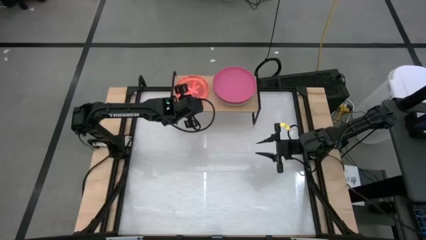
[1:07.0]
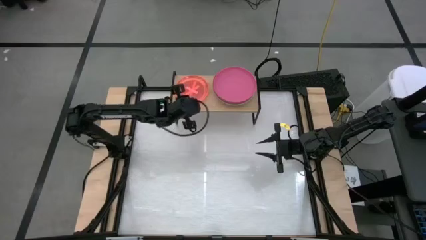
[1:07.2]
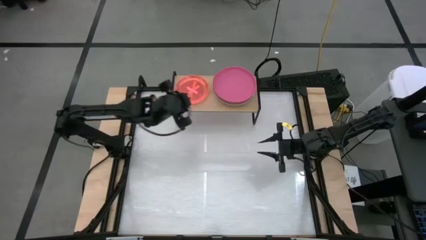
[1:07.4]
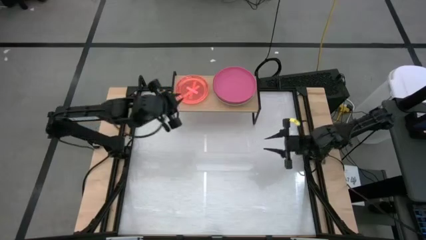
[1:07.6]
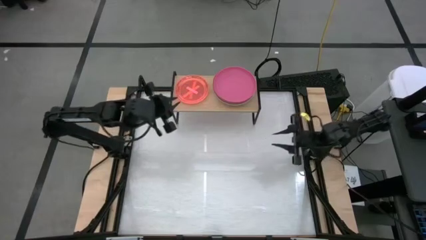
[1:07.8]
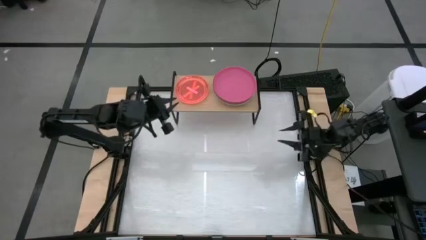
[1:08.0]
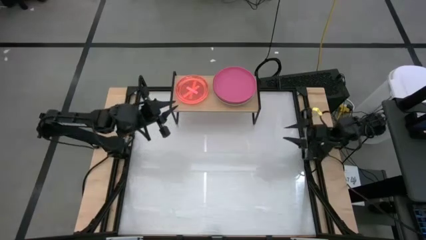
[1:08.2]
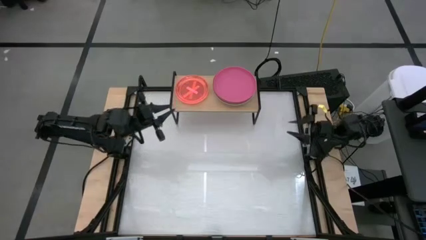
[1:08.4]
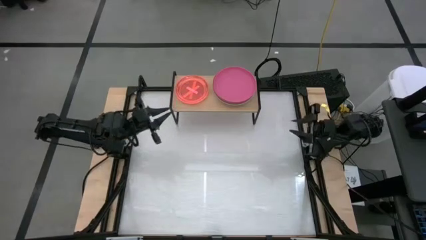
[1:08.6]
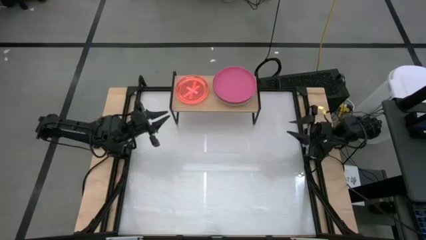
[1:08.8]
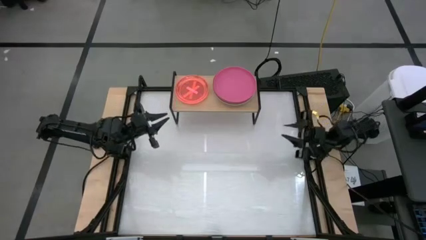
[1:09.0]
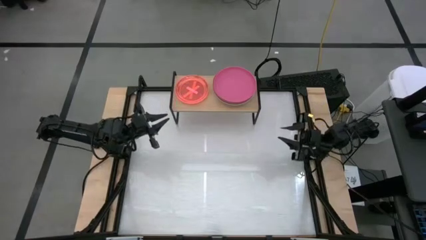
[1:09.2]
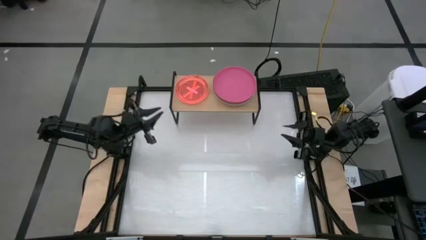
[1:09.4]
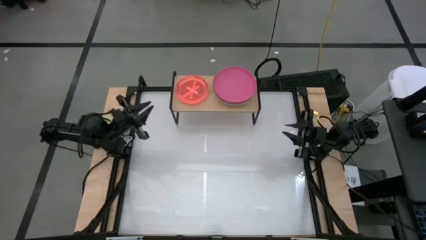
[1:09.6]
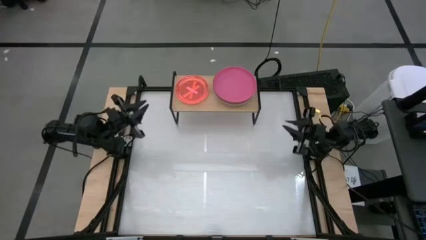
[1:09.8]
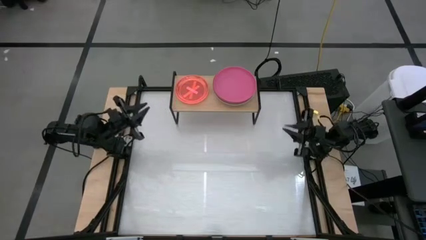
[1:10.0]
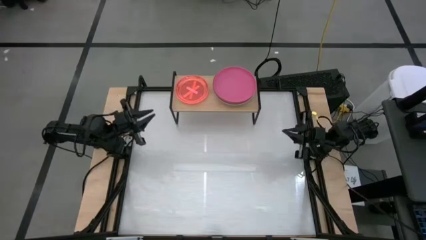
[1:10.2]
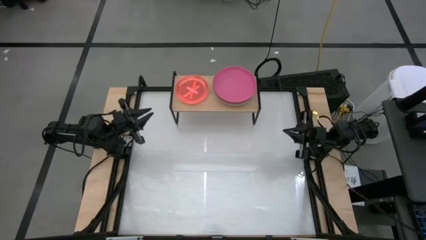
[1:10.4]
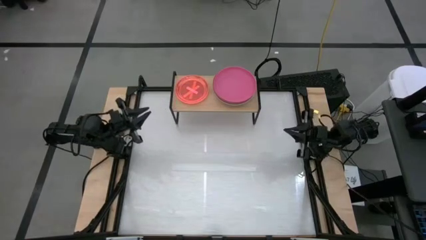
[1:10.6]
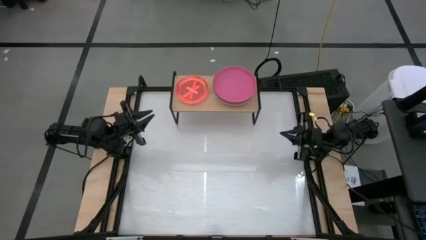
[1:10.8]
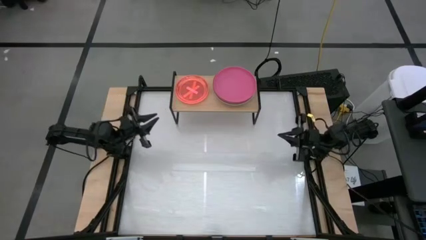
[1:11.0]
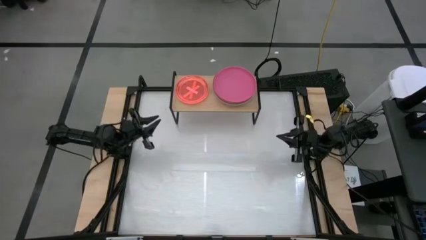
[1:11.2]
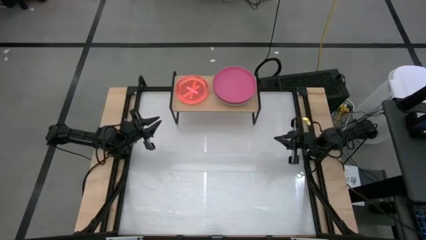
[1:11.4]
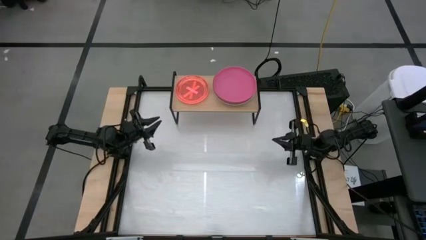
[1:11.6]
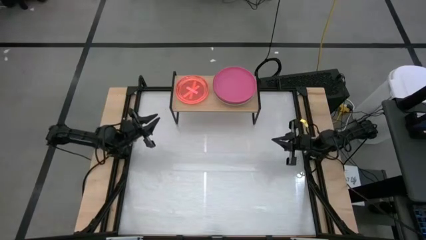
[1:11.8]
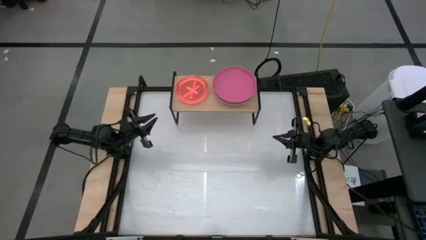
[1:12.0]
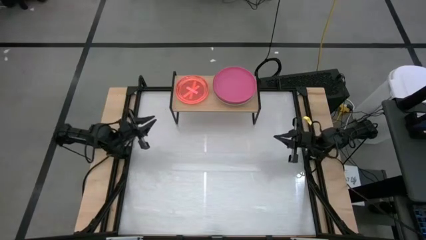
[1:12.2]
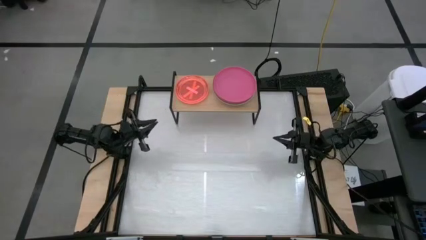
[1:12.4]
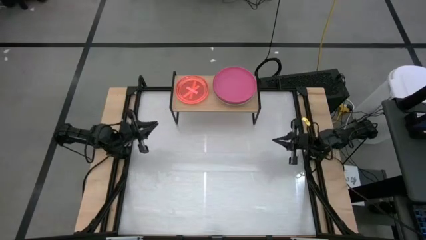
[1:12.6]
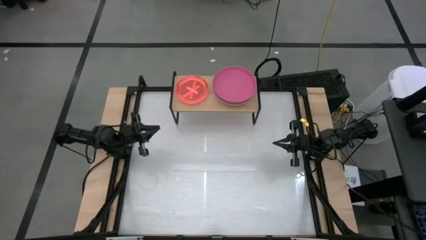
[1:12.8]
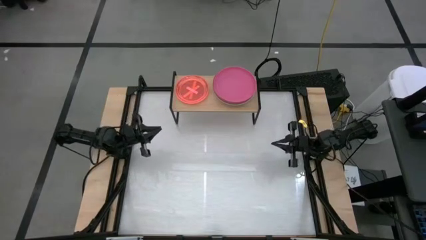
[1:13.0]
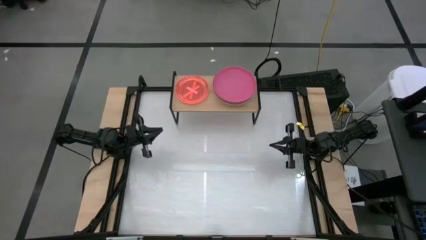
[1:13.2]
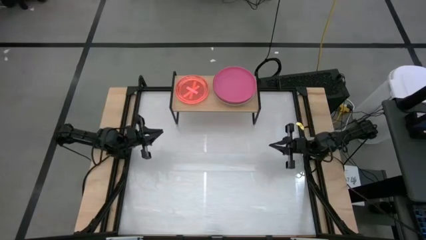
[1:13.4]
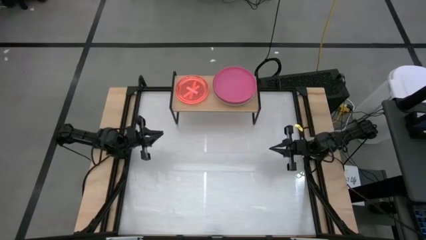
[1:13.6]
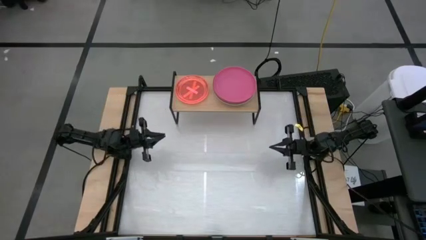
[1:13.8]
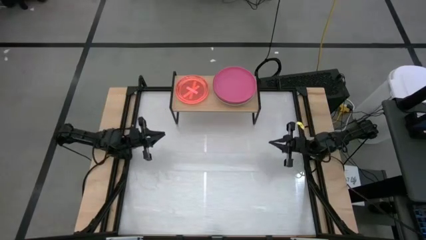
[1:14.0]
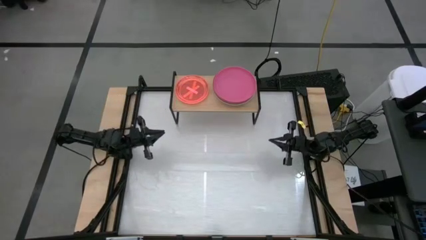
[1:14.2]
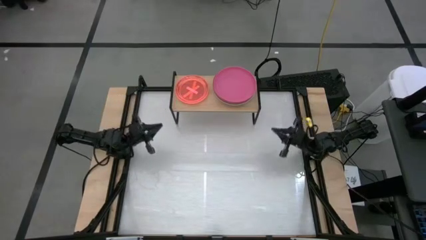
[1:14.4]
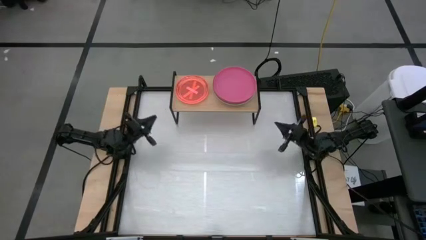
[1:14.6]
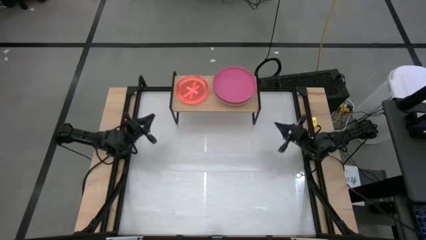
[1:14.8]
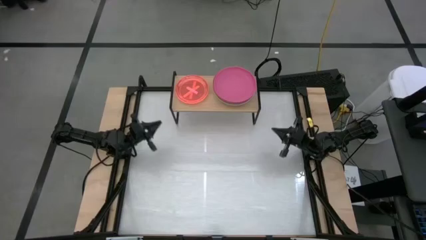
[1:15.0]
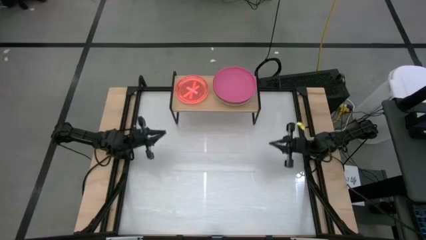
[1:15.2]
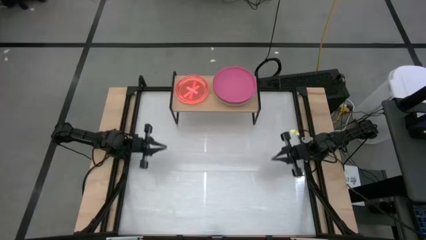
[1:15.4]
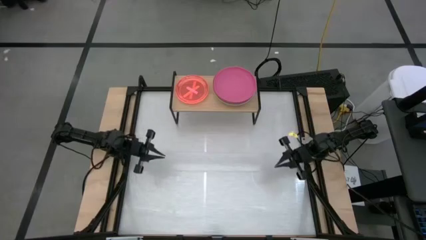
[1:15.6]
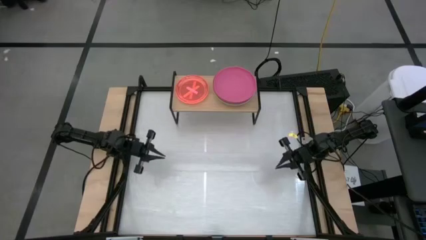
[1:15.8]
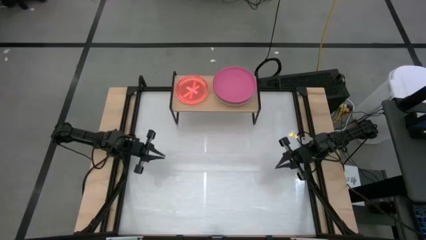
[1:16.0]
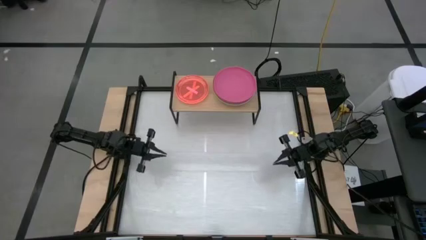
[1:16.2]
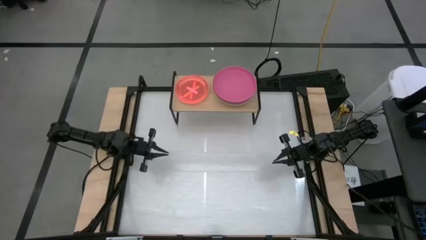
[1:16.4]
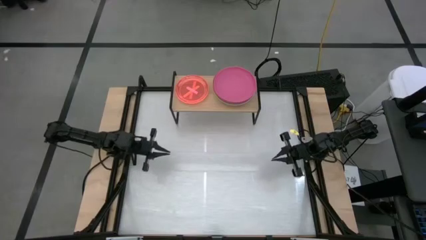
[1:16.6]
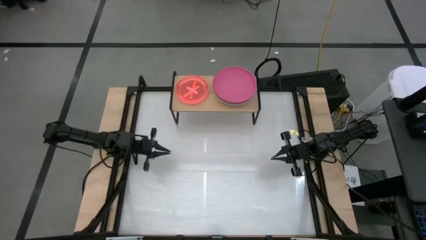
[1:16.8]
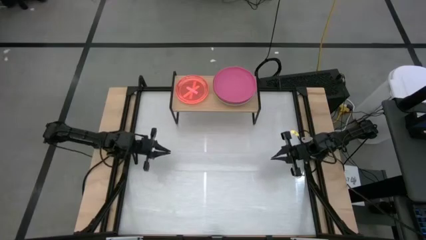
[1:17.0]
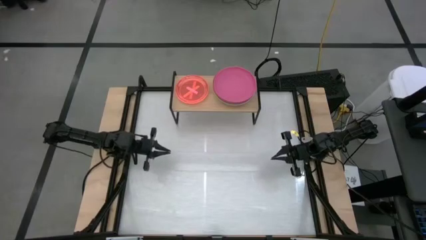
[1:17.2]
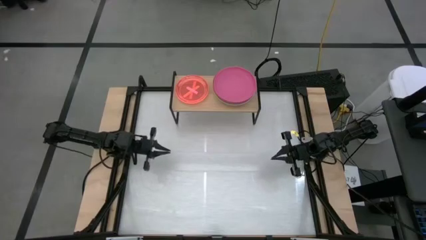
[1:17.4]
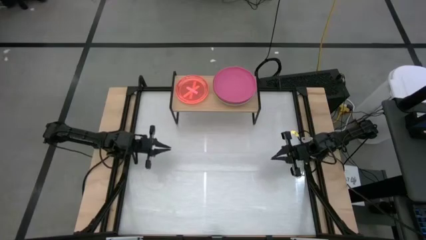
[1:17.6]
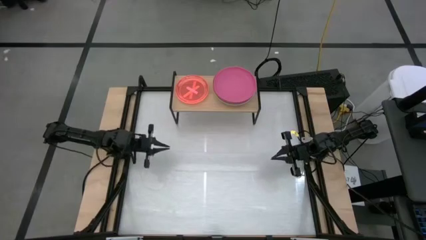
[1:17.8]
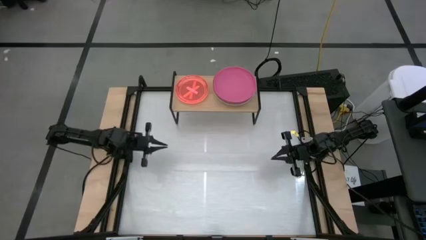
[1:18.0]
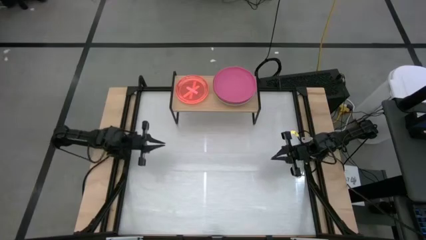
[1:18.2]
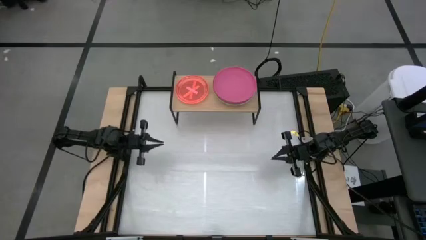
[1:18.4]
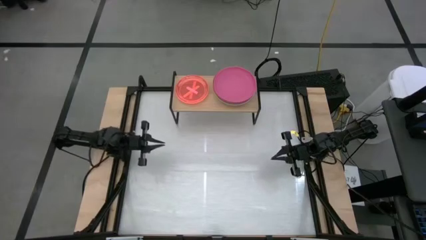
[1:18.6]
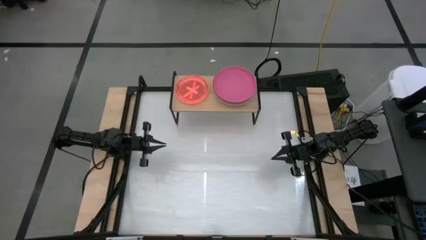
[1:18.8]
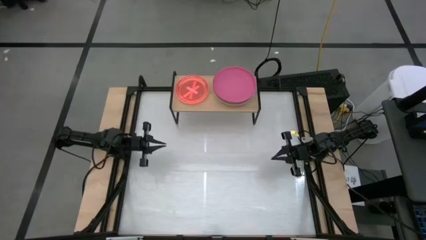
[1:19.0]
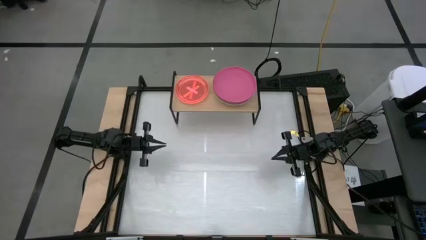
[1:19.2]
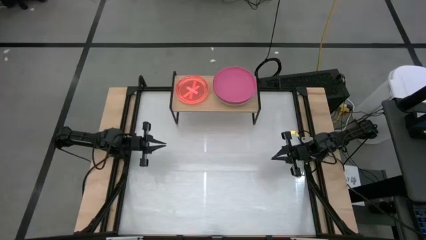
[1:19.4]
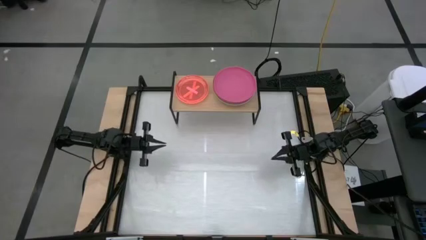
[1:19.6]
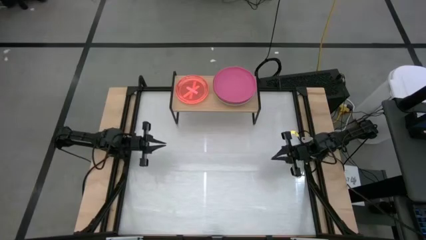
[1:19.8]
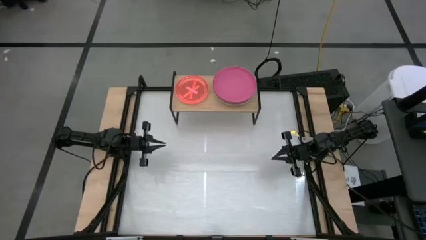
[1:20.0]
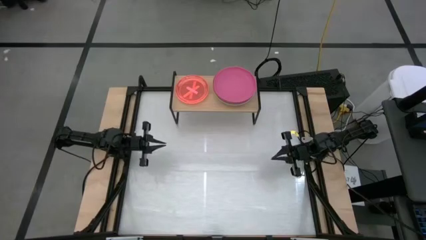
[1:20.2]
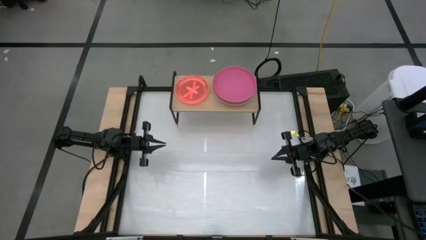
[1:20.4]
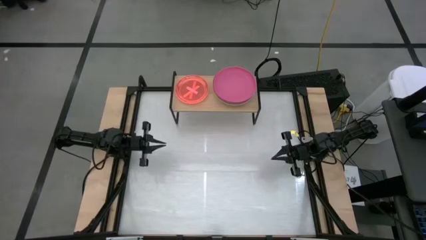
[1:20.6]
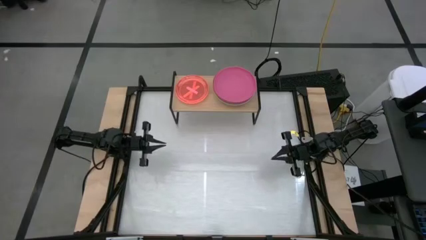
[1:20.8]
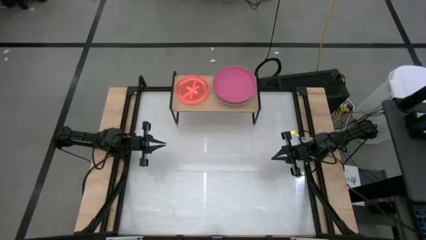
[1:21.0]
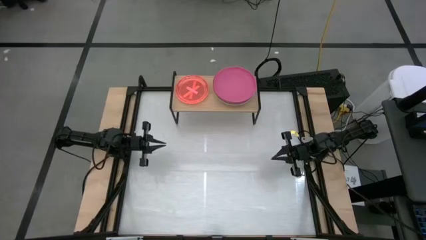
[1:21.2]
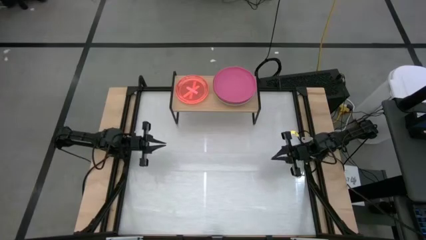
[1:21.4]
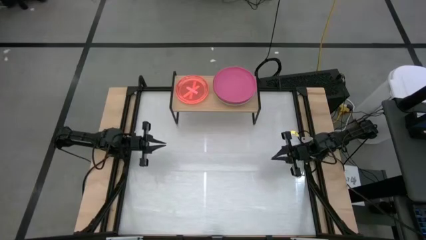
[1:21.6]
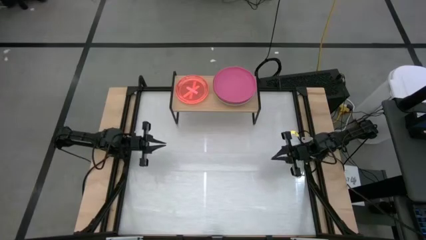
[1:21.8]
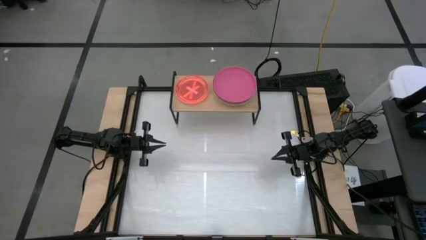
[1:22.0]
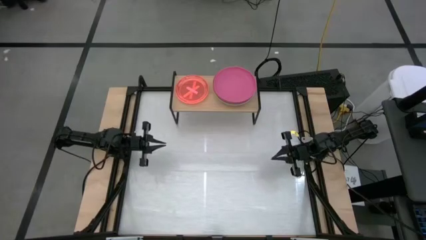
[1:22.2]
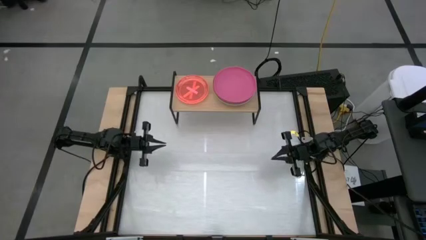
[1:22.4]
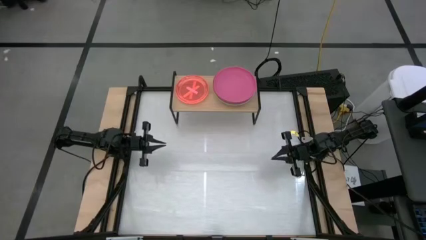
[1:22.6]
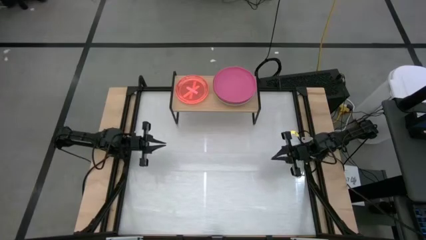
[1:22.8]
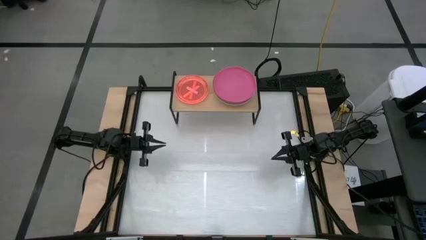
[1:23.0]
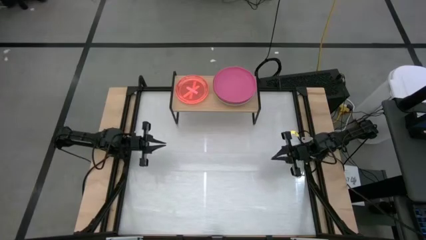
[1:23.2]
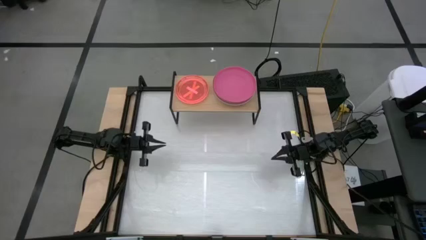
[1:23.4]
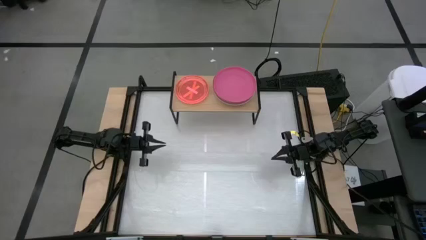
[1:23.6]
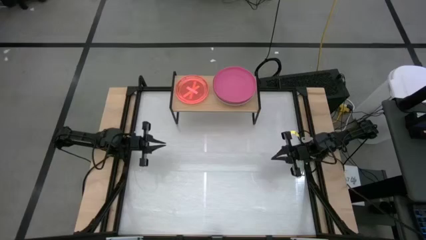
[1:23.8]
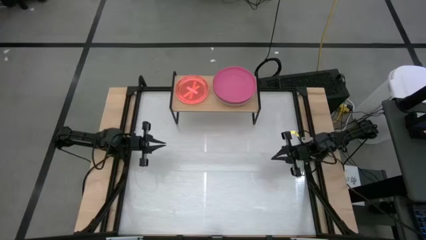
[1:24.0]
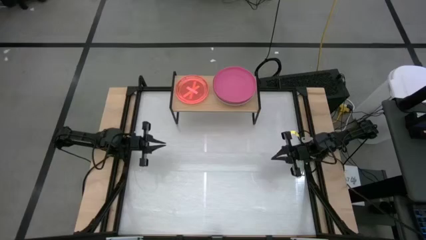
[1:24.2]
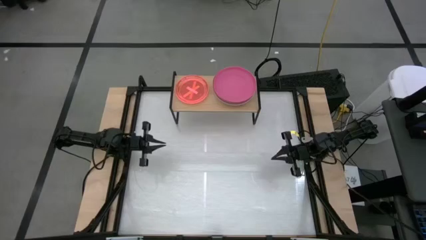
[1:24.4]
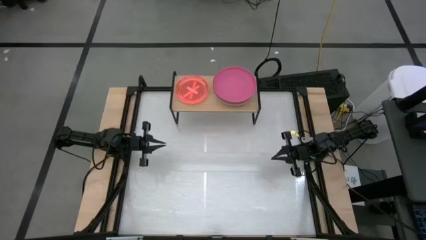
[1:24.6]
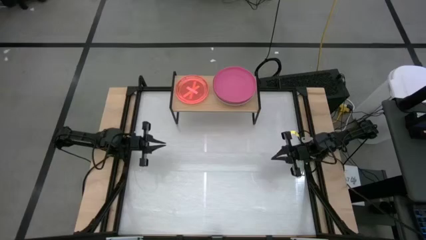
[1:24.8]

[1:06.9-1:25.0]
Task: Place and stack plates onto a shelf
Return to Home Position
